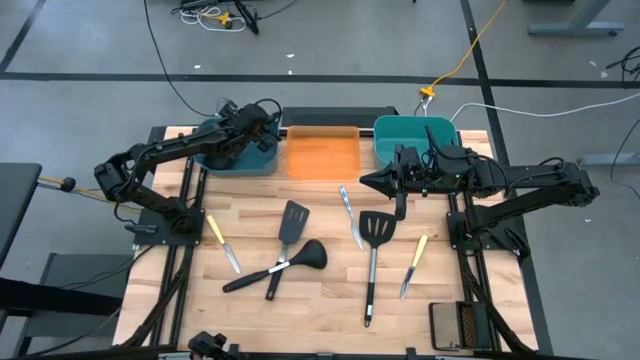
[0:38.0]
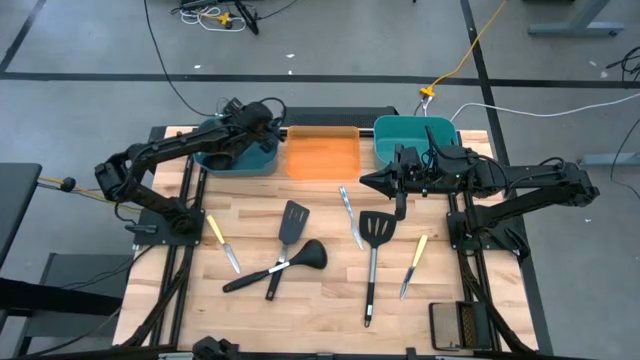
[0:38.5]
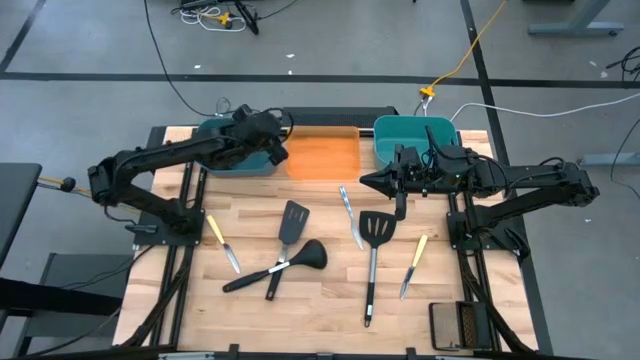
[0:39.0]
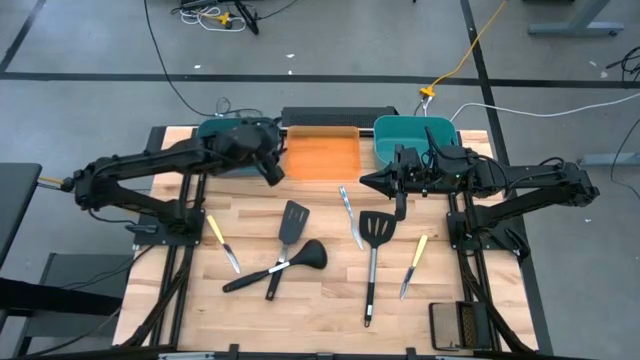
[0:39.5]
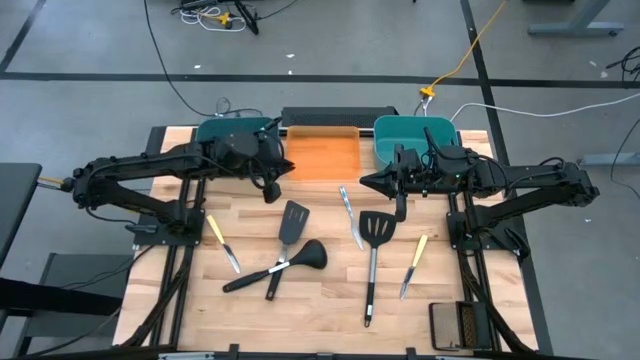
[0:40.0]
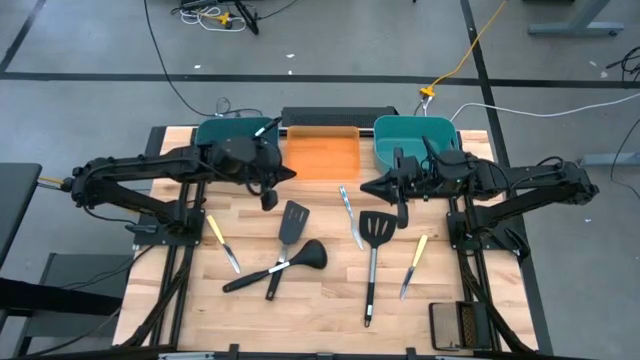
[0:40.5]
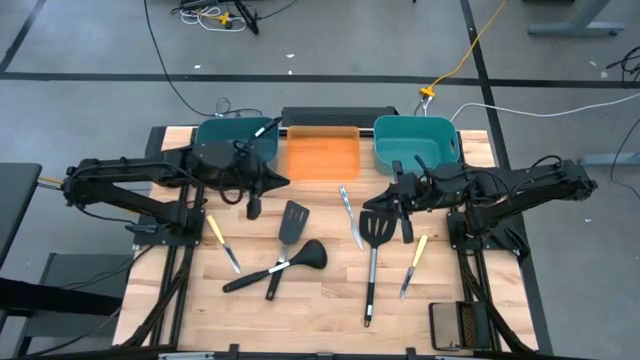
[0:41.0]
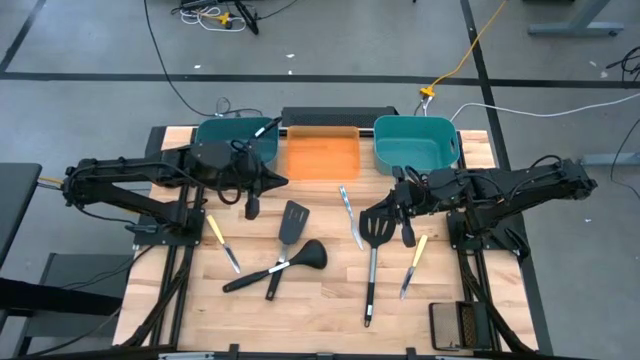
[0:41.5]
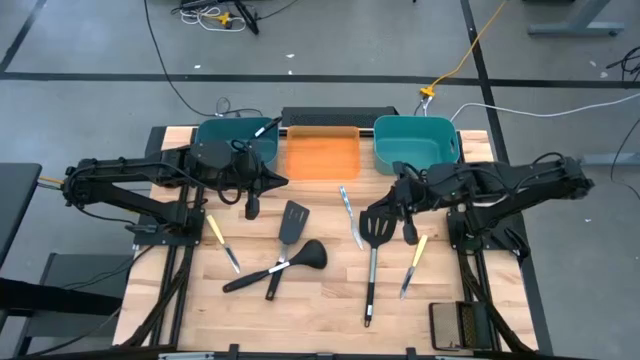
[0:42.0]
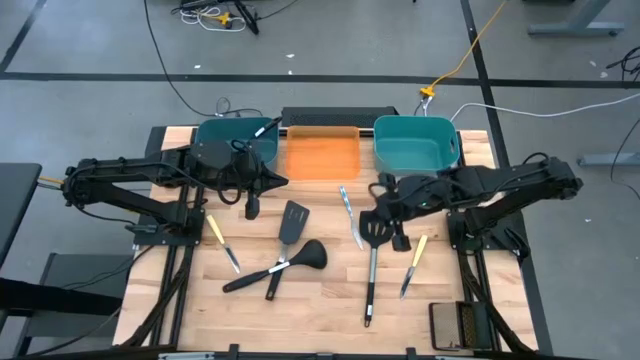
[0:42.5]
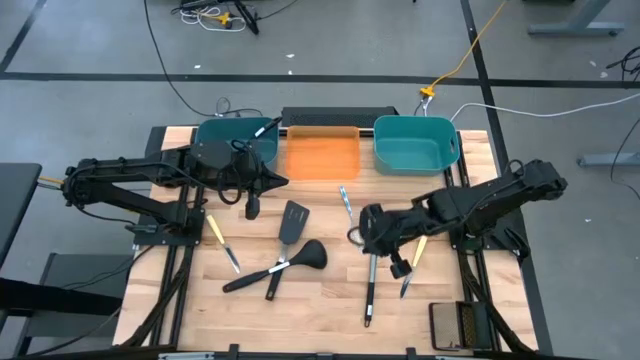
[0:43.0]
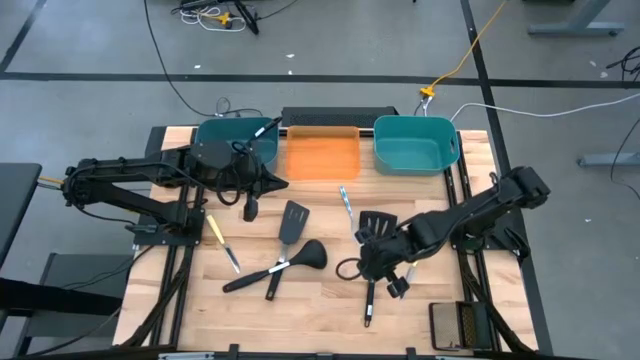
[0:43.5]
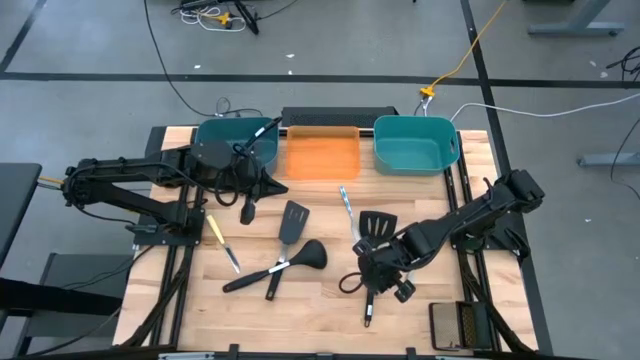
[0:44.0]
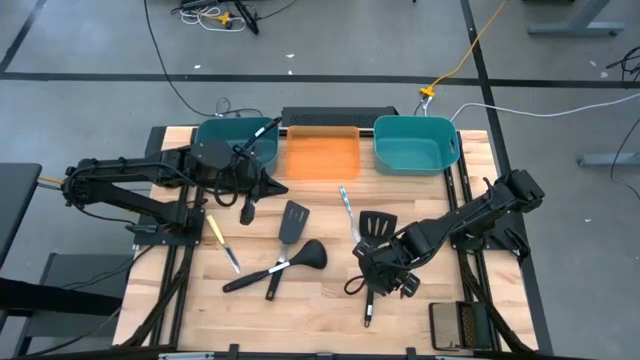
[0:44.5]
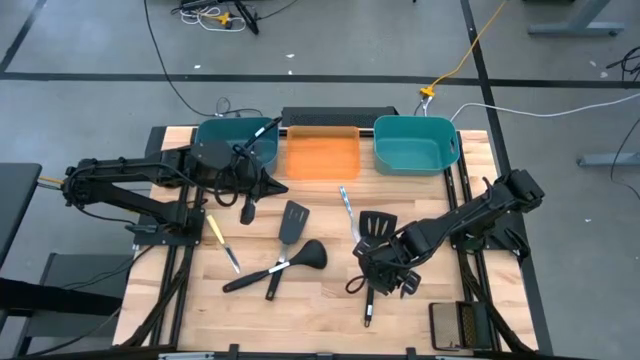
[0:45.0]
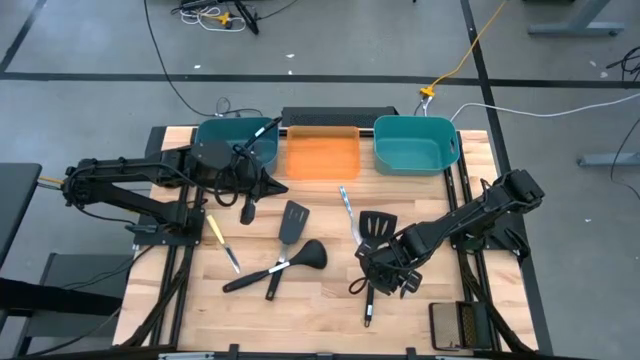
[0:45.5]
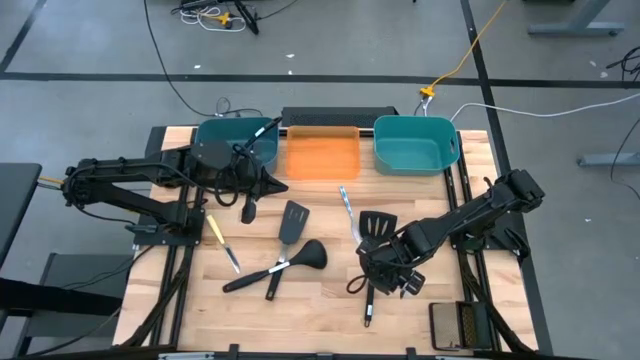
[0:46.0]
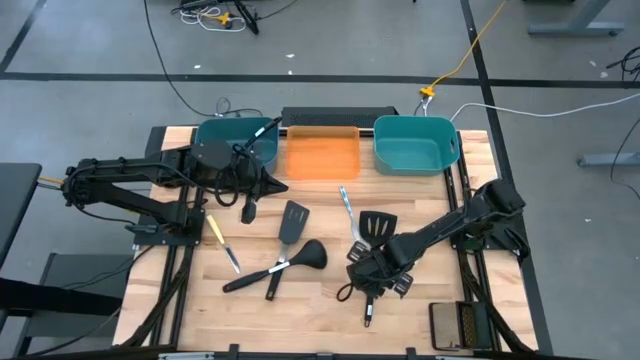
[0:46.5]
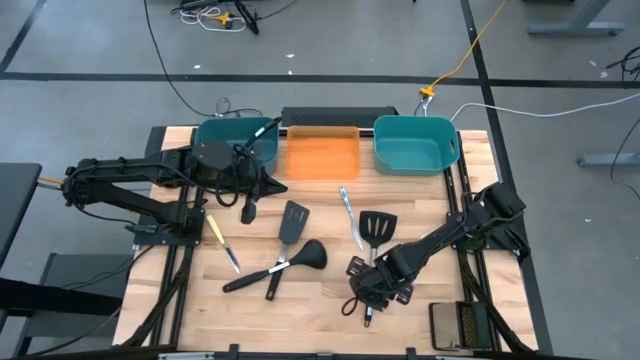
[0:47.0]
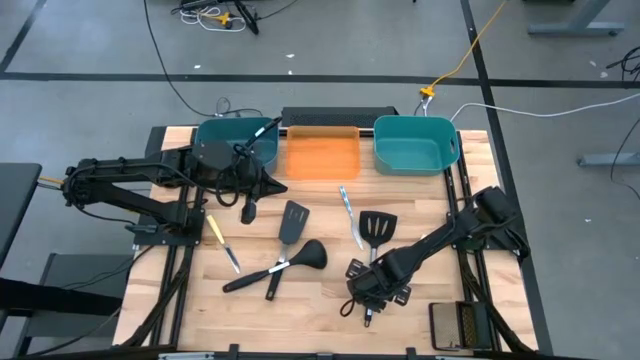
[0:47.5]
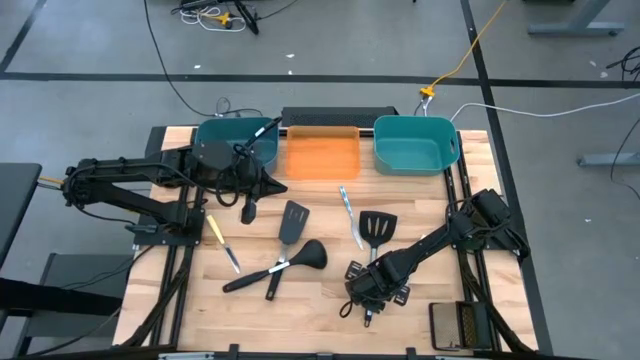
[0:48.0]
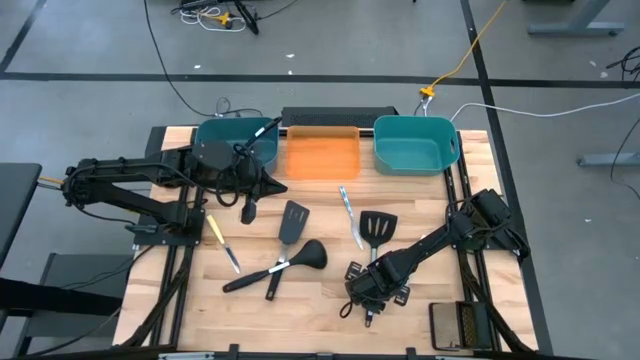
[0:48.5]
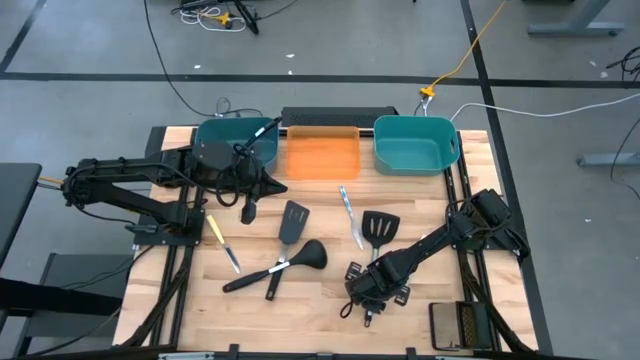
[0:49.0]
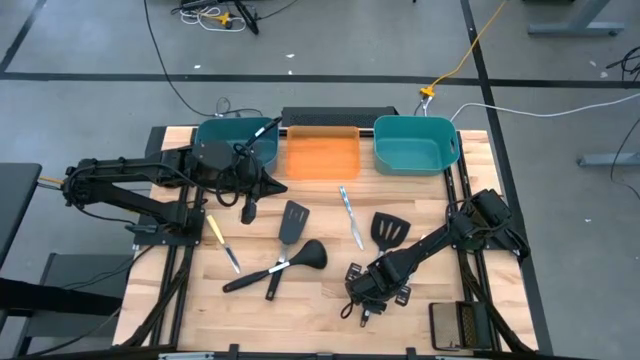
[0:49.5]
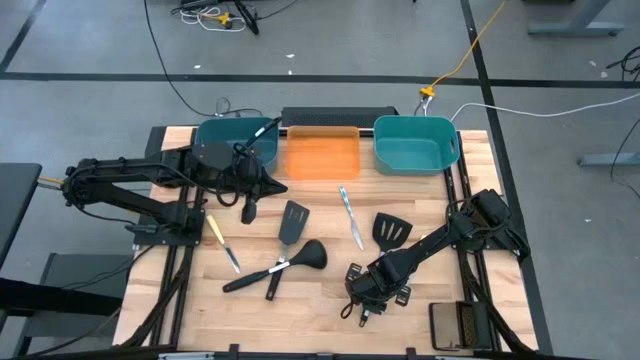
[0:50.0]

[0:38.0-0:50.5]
Task: Pick & Place Kitchen Items
Put the black spatula into the green bin

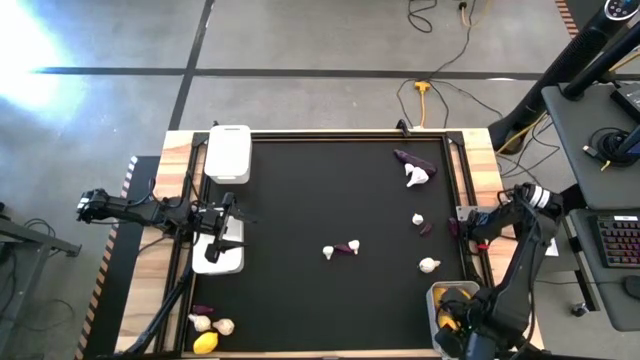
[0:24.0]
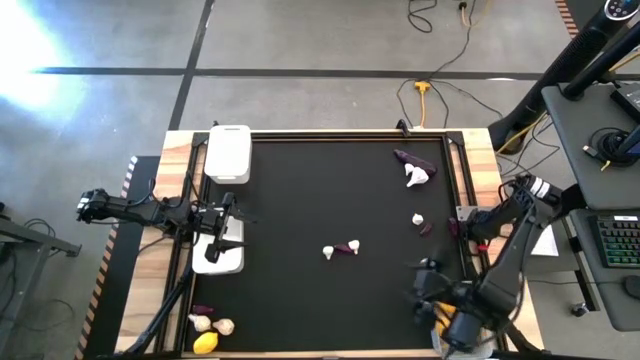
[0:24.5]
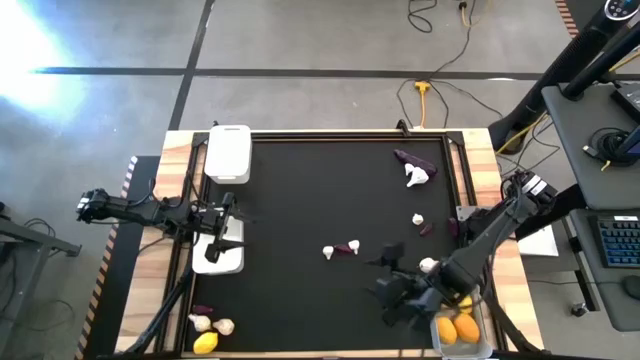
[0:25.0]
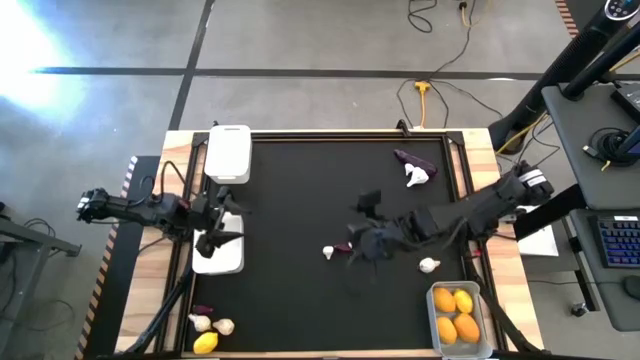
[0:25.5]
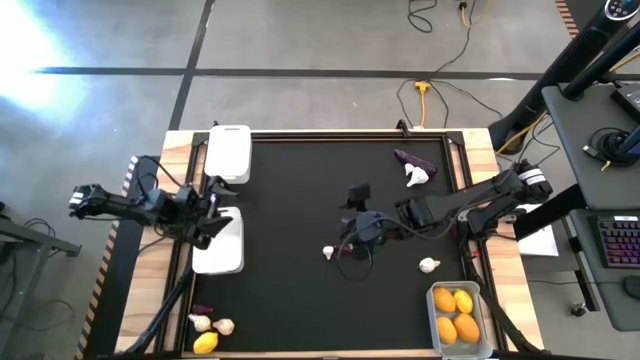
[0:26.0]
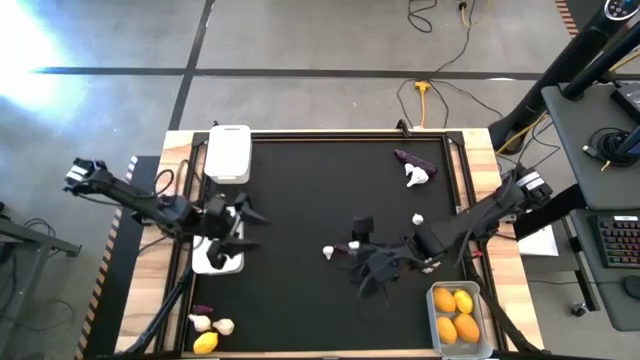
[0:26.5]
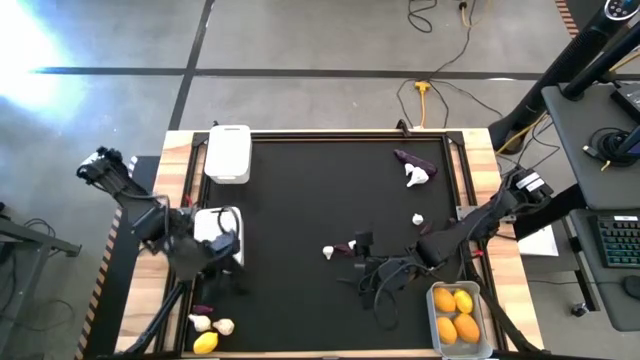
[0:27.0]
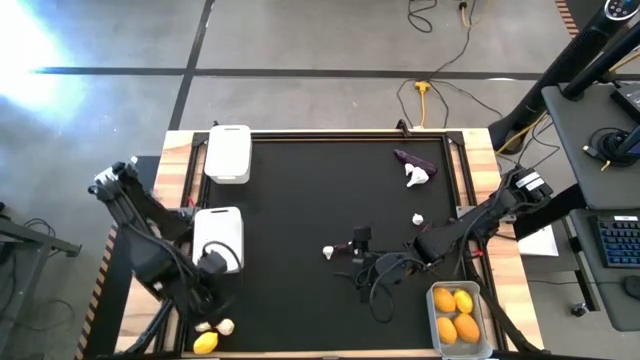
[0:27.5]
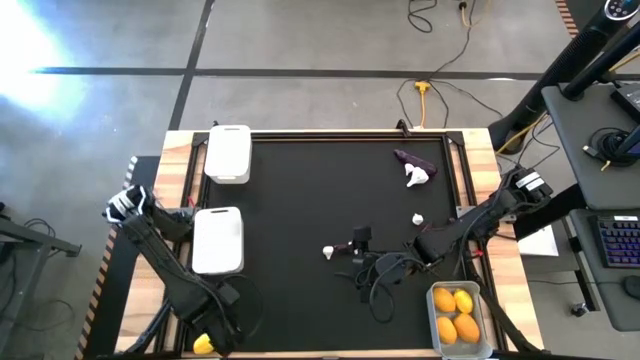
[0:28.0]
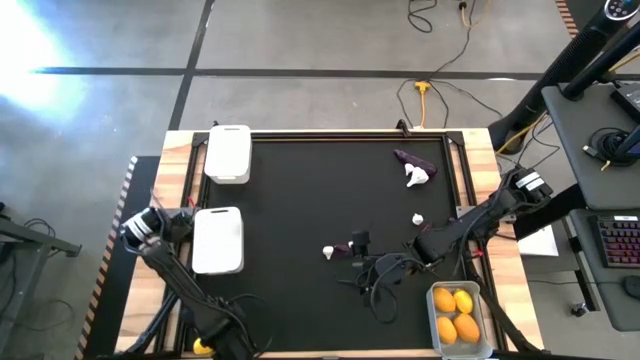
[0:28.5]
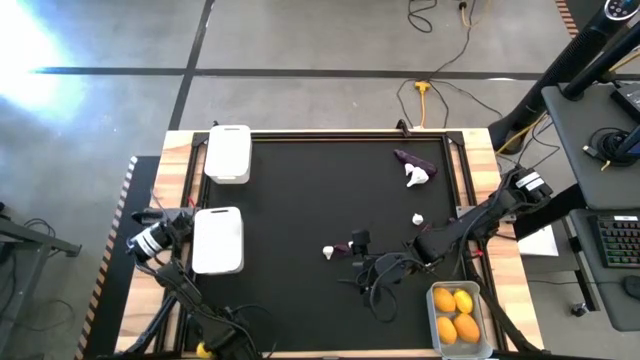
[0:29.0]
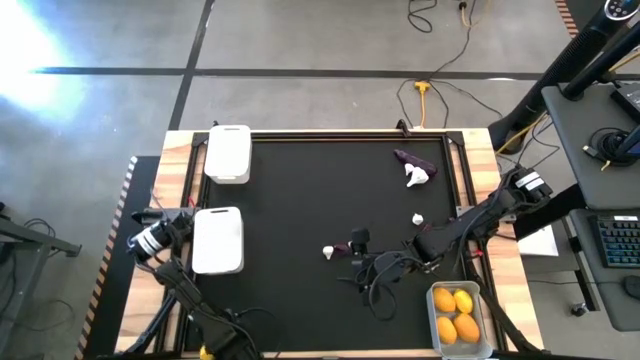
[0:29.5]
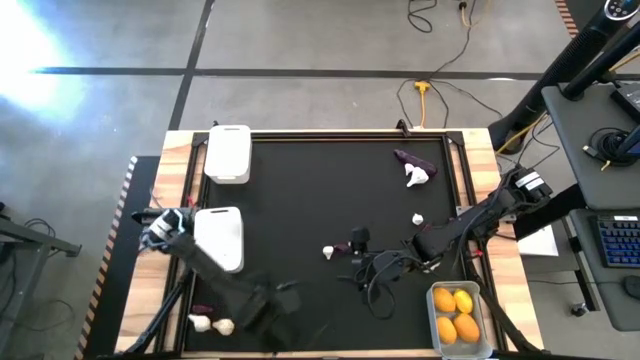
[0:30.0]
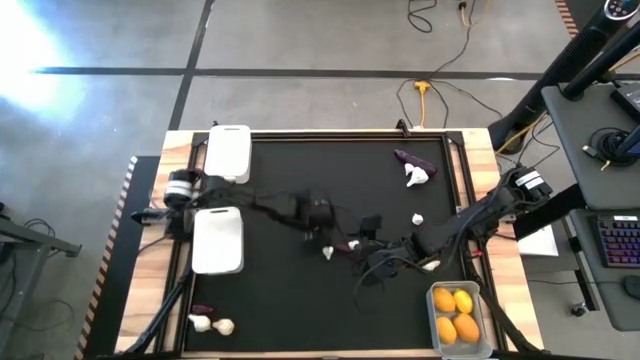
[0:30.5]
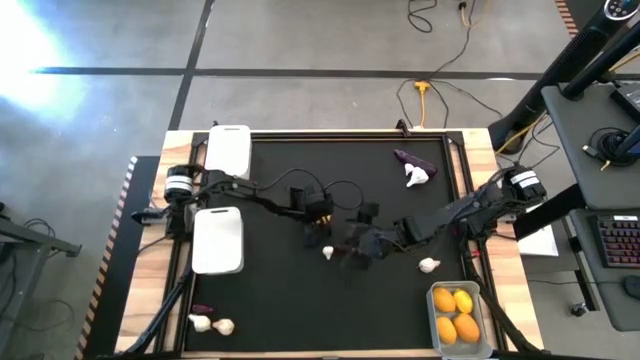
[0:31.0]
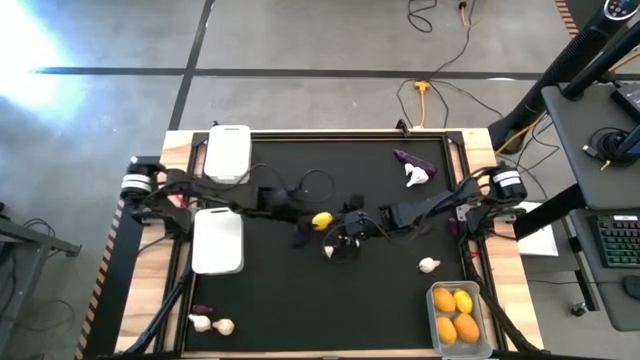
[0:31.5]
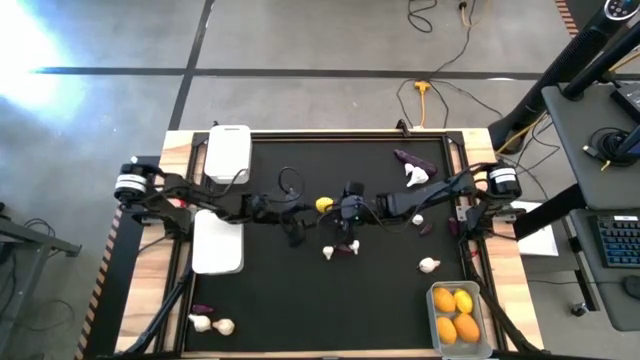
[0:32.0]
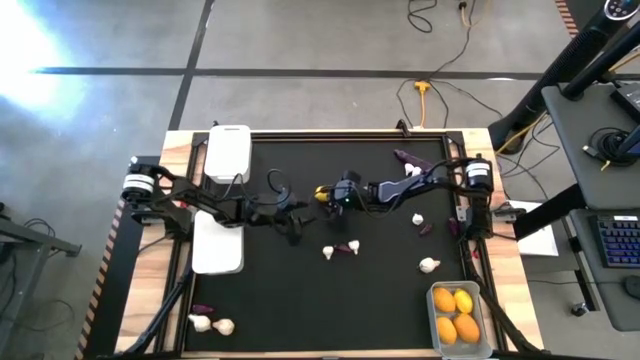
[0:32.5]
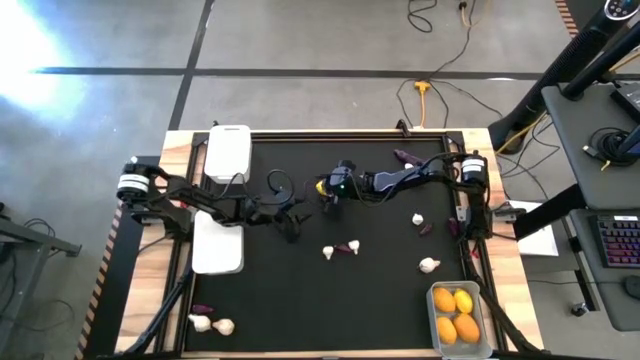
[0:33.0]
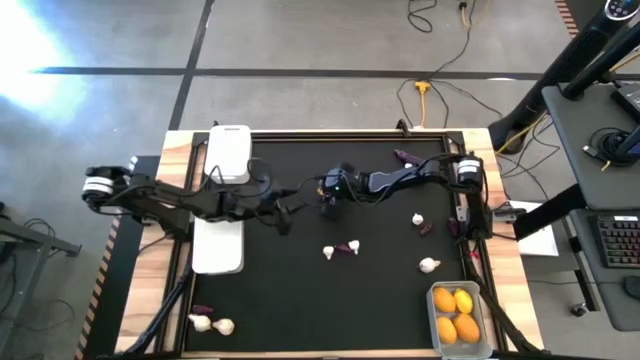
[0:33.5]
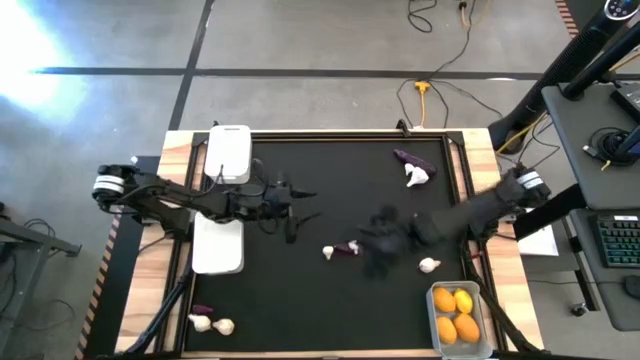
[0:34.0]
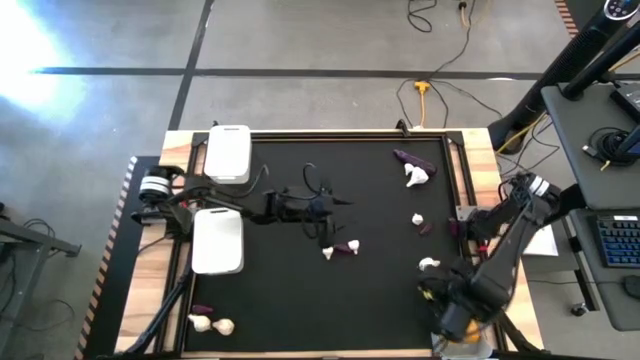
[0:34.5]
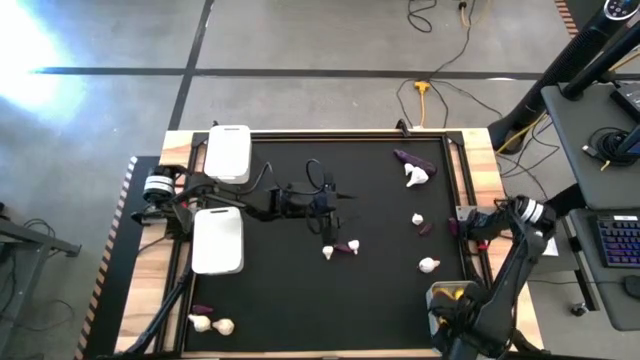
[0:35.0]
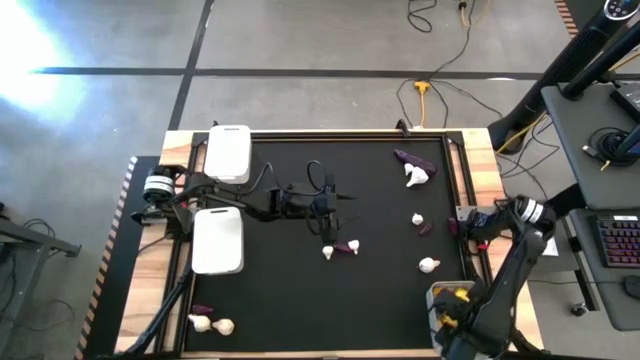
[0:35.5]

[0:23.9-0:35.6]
Task: Sort produce into baskets
Put the lemon into the gray bin
